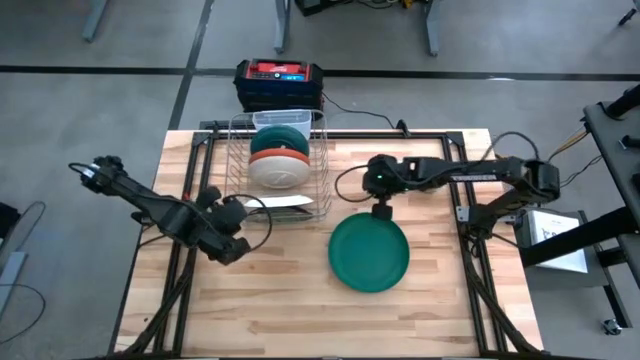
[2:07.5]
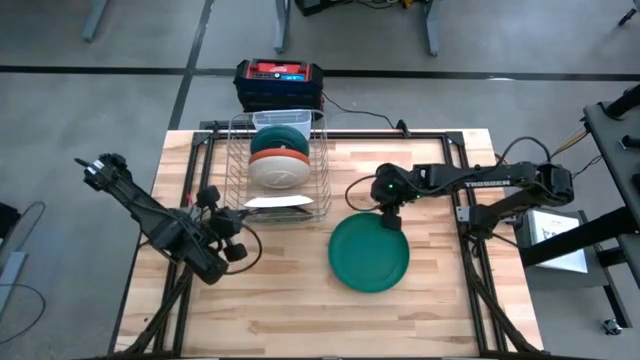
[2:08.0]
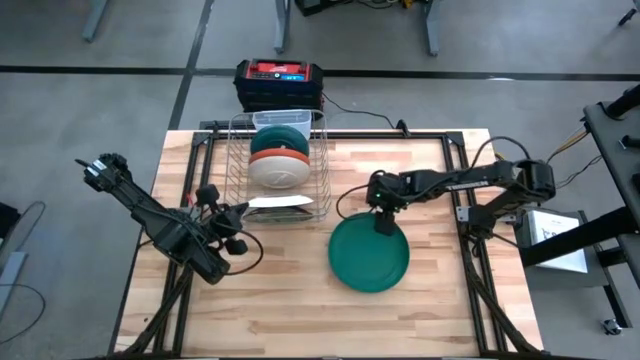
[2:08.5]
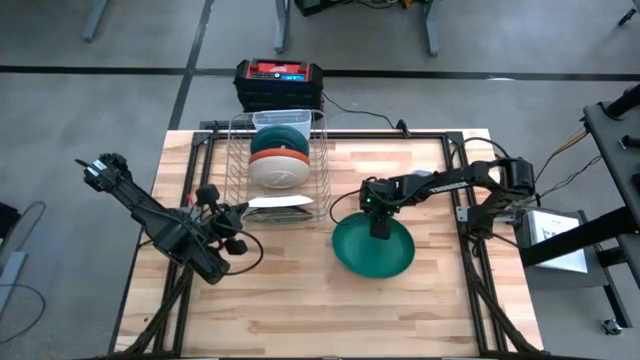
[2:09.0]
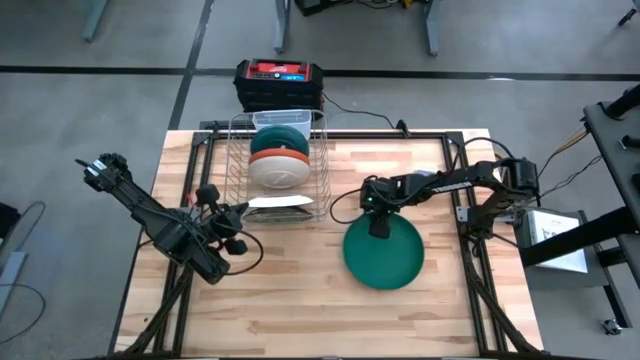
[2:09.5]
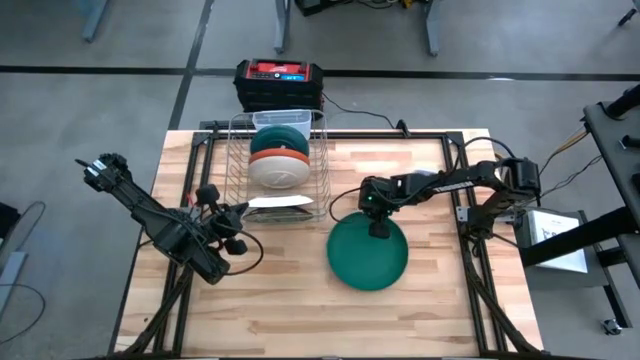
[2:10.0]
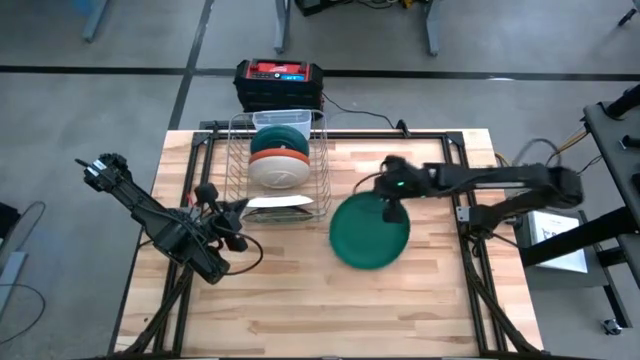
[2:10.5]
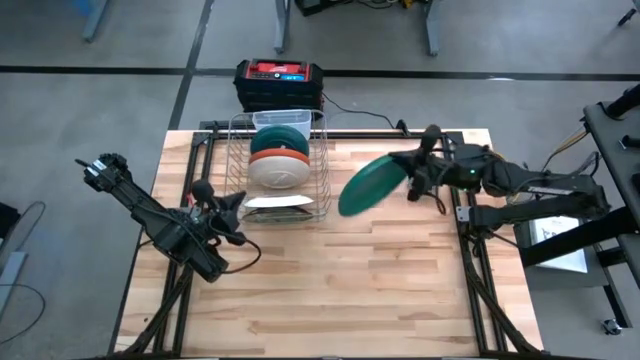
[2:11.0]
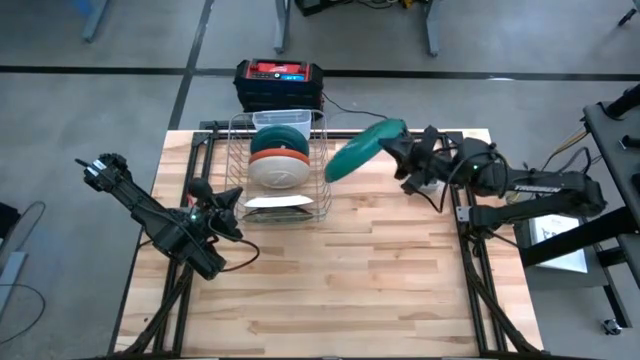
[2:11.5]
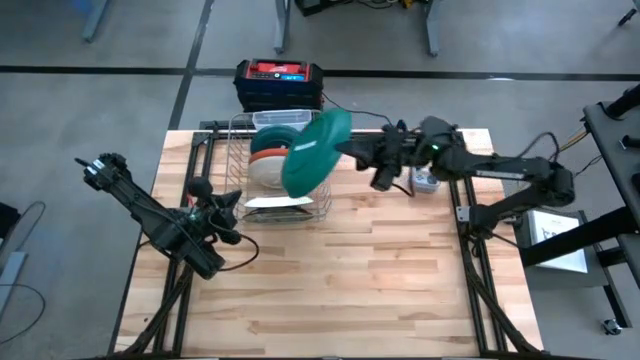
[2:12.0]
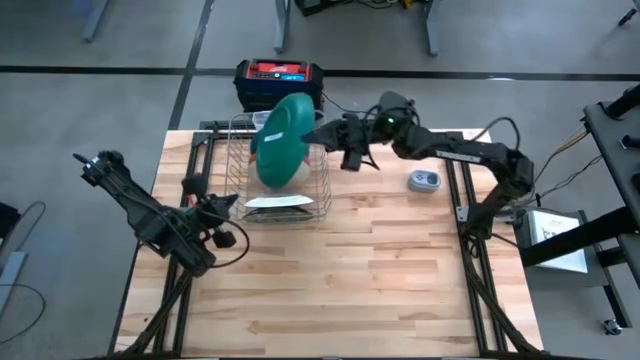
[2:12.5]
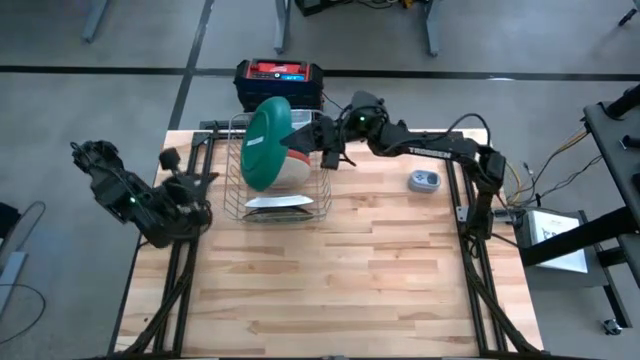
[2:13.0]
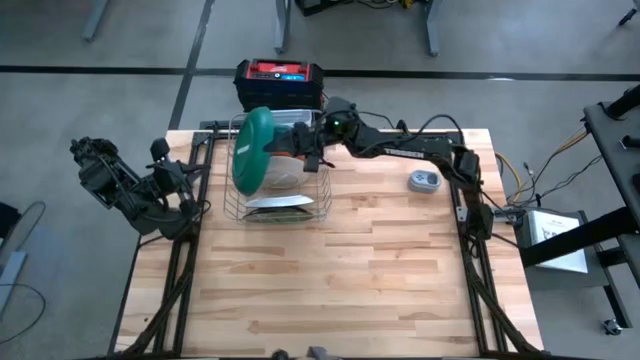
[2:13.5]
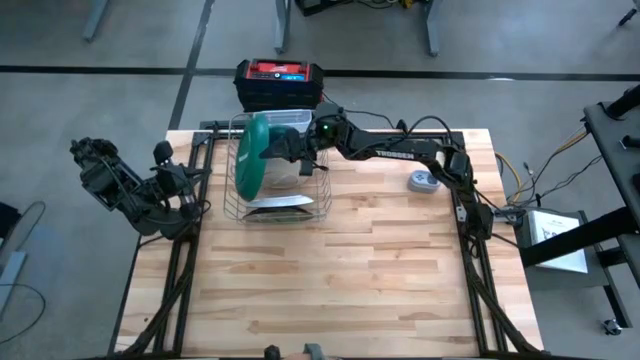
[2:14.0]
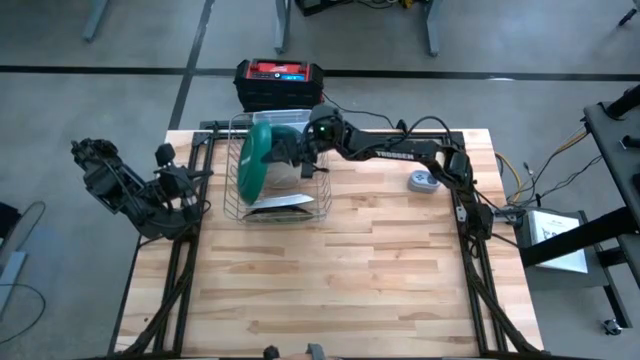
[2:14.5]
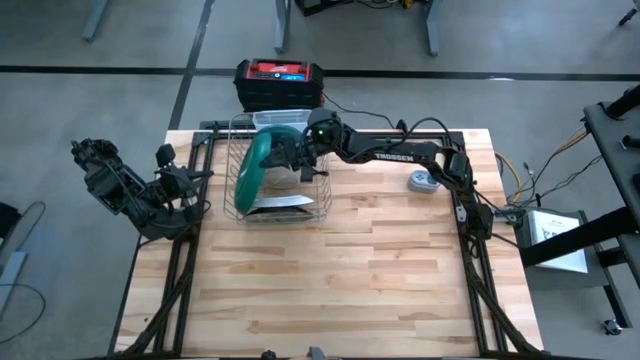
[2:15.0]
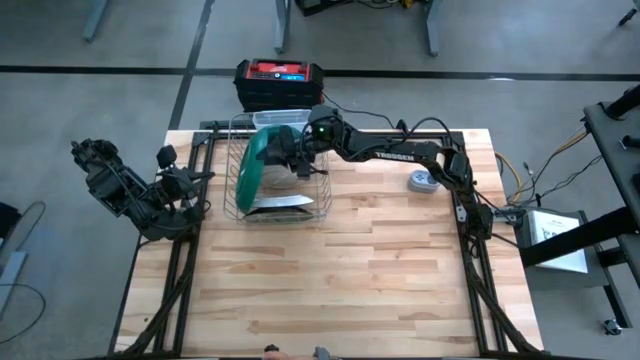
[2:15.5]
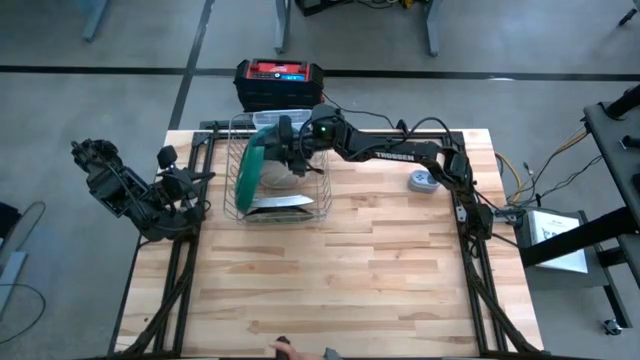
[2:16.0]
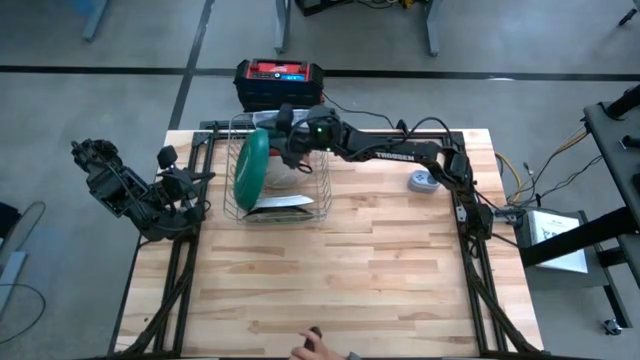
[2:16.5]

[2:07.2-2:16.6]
Task: Sort dishes
Put the green plate into the dish rack

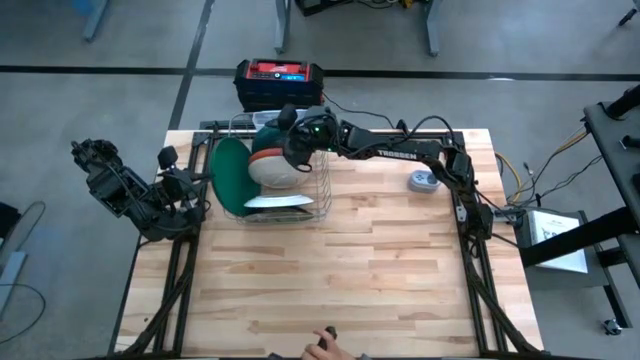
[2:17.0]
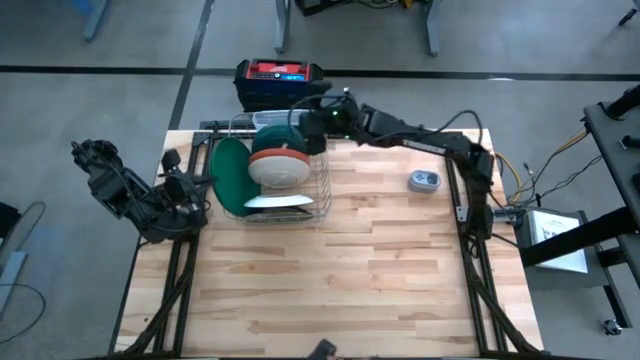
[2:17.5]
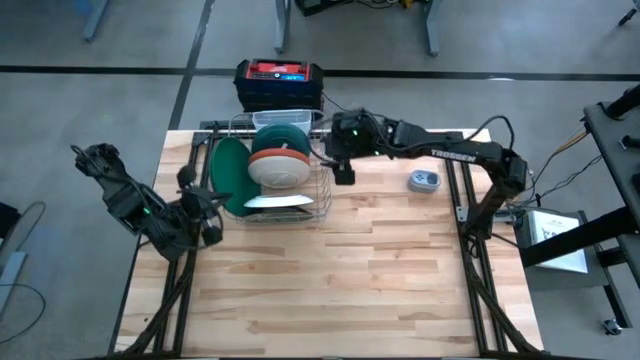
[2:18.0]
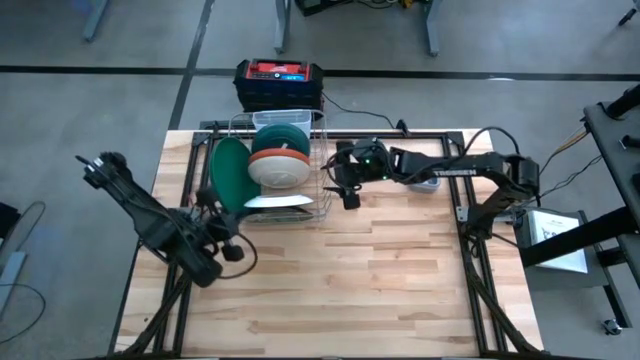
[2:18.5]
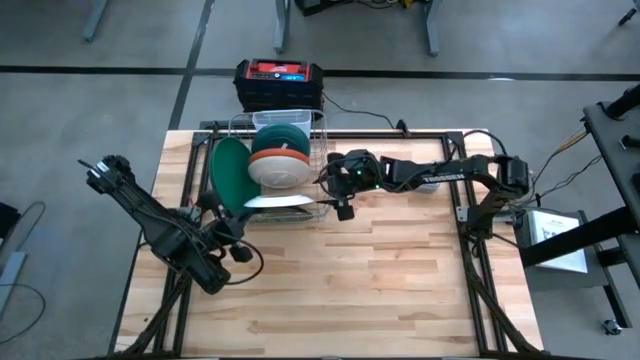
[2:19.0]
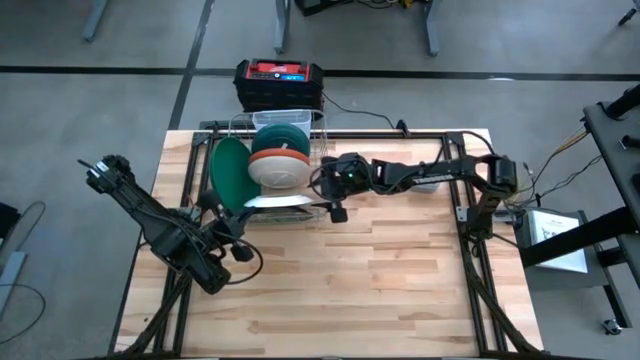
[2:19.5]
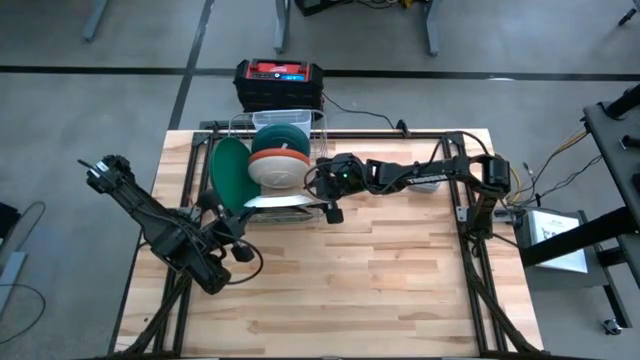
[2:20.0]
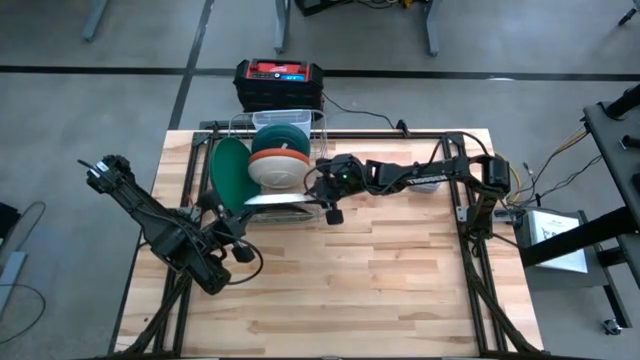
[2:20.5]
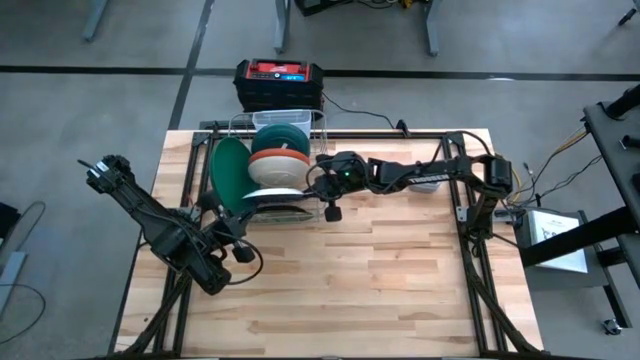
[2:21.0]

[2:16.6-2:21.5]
Adjust the blue ceramic plate on the dish rack

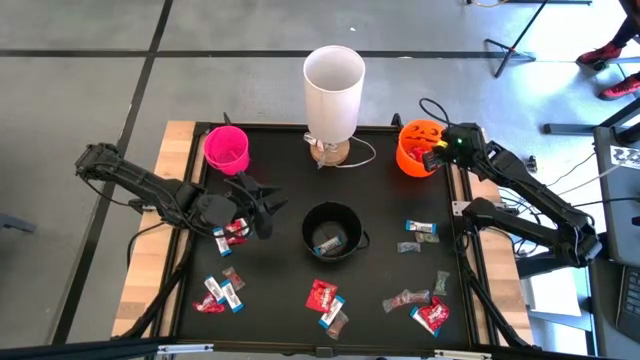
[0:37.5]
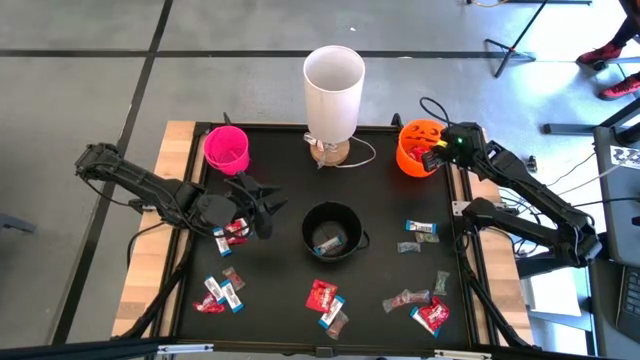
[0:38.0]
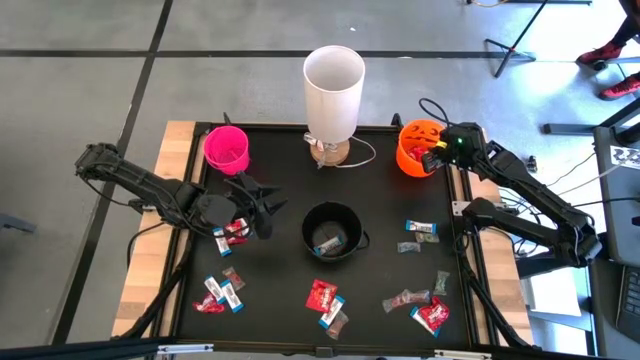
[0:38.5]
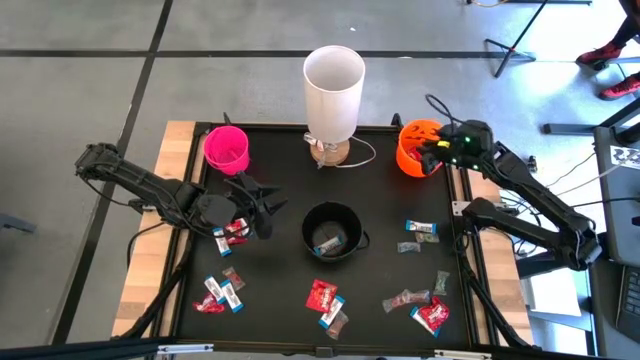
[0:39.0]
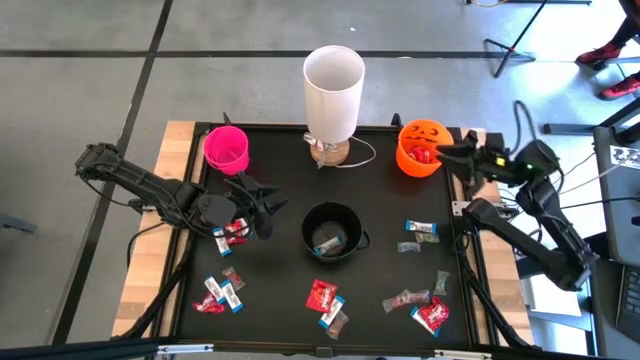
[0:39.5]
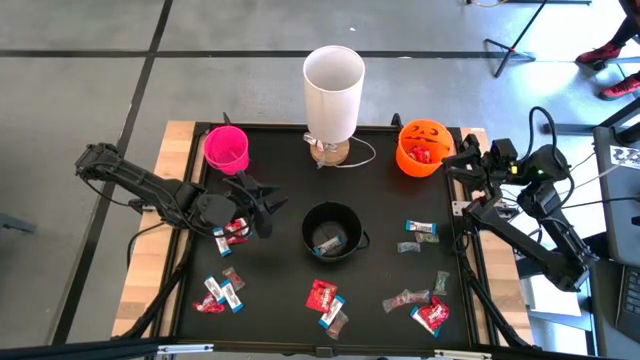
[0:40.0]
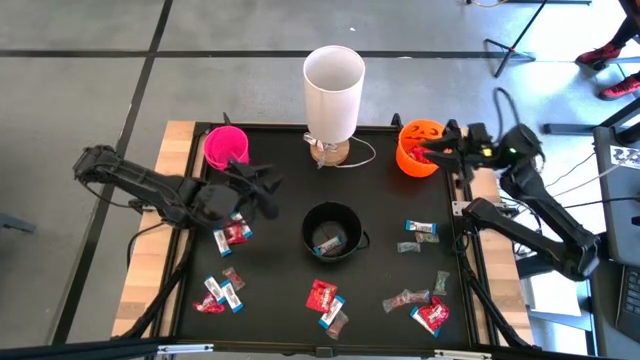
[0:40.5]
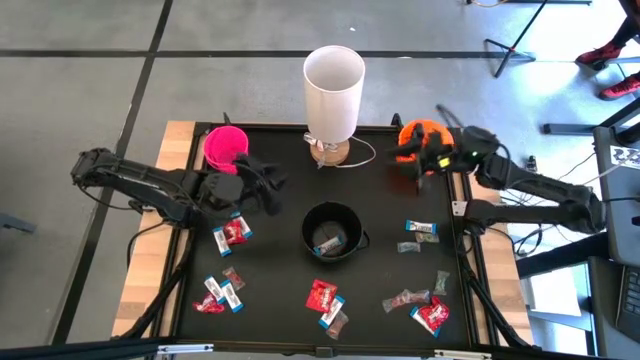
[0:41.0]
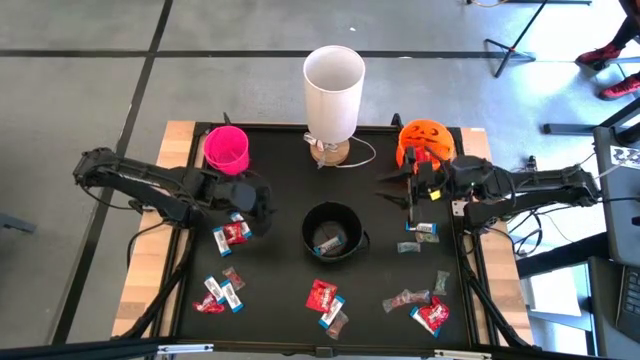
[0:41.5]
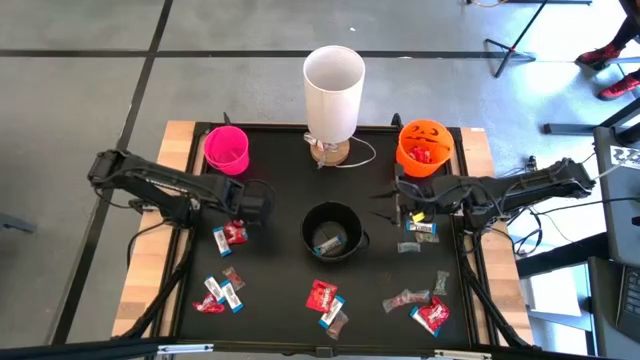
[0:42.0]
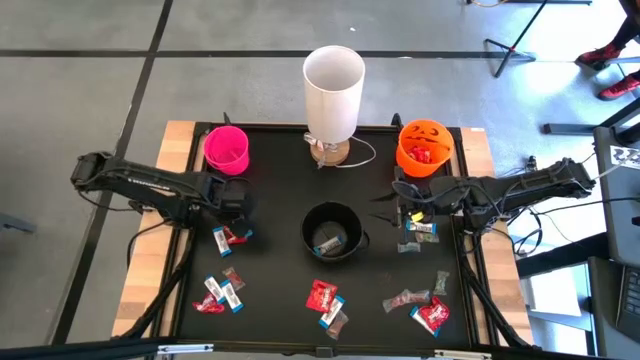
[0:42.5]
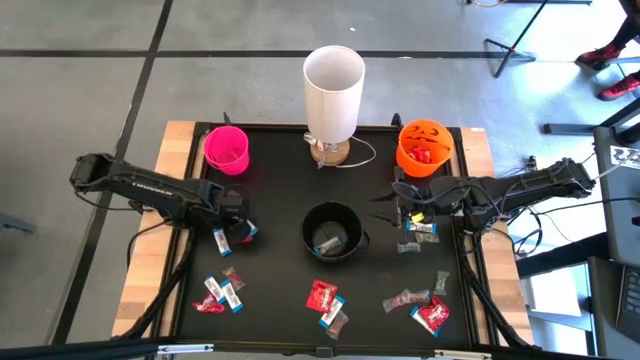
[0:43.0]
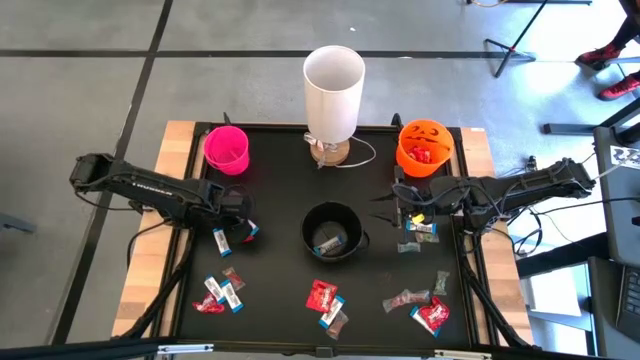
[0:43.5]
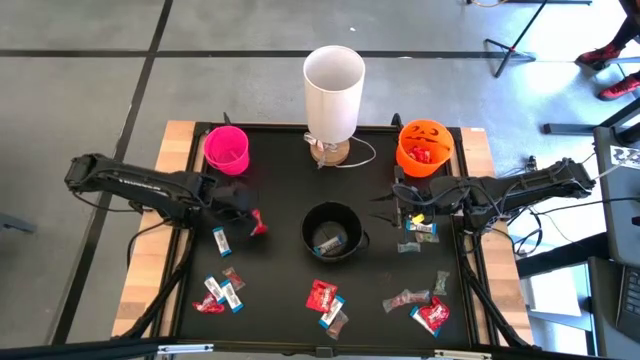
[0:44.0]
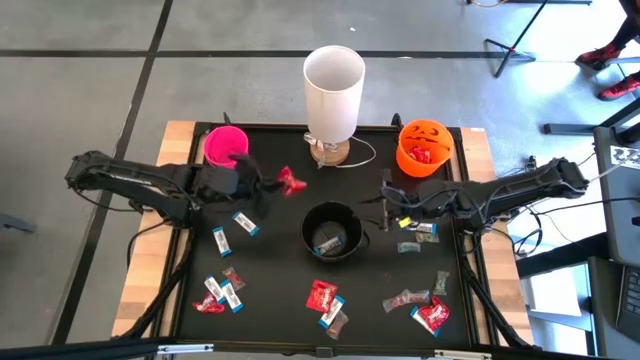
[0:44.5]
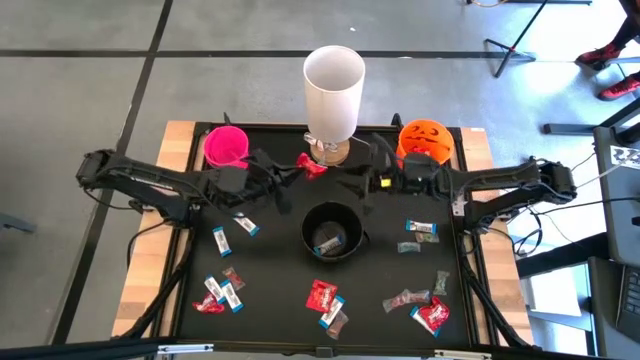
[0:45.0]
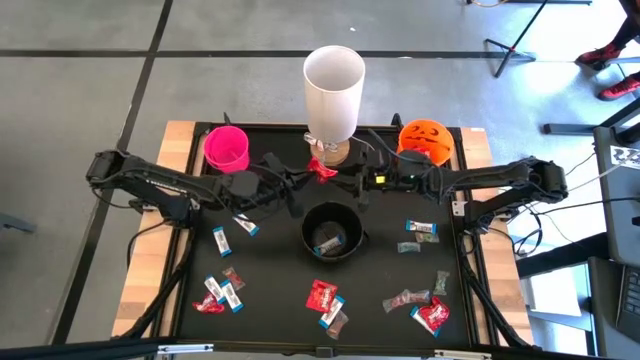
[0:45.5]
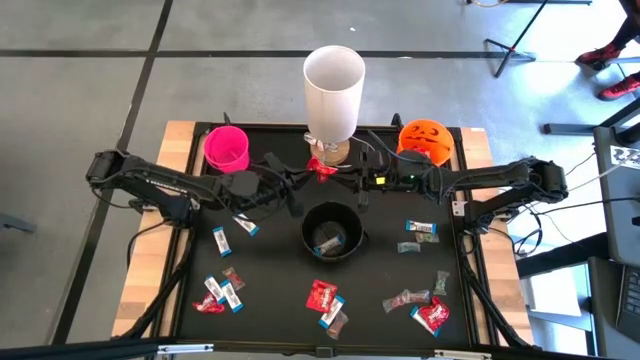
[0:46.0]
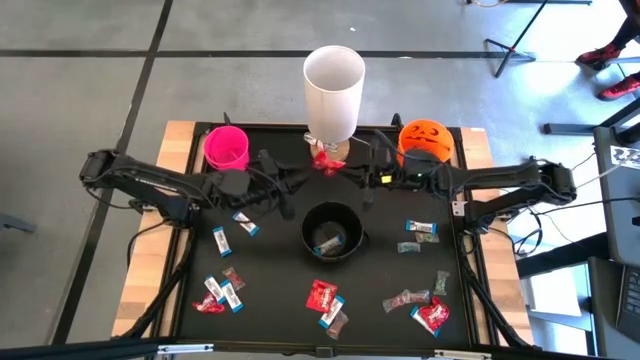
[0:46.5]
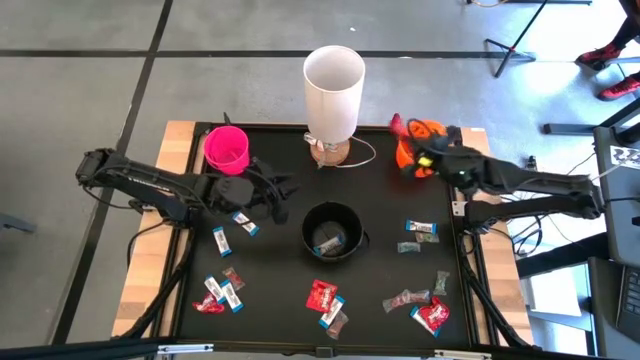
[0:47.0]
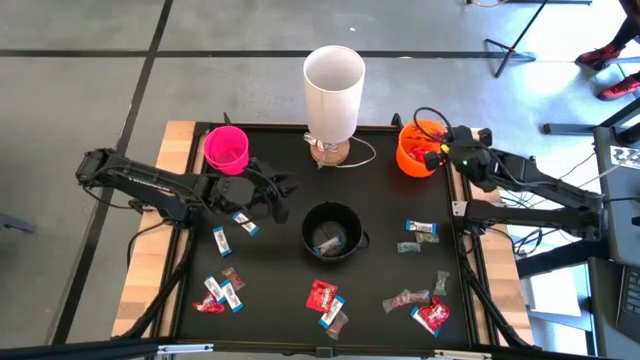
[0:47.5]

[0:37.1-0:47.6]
Task: Sort candy
Put the red candy pack into the orange bucket
